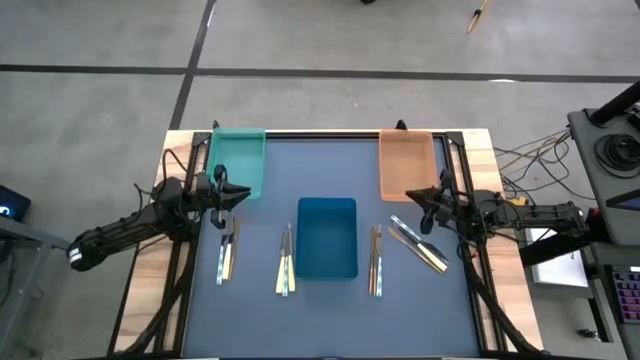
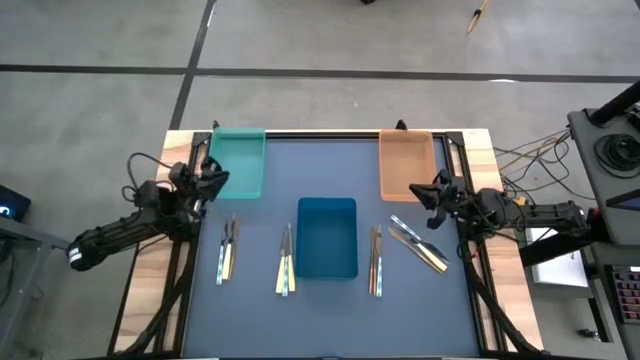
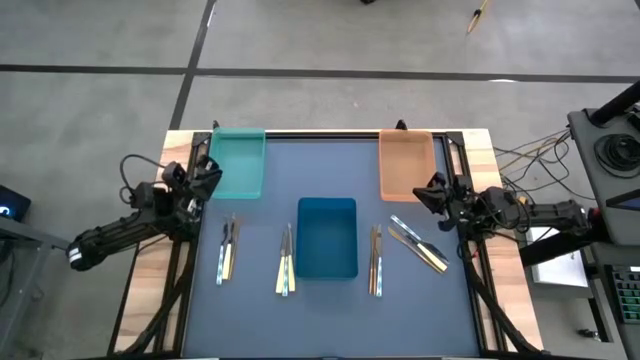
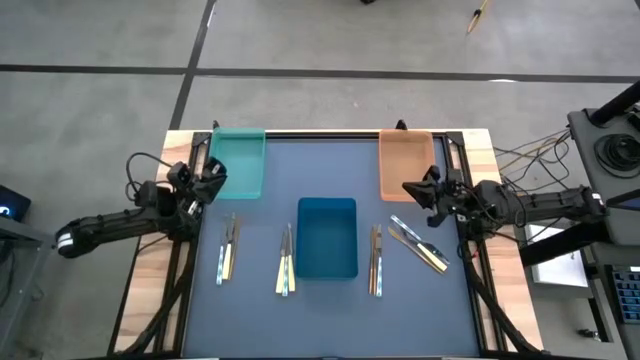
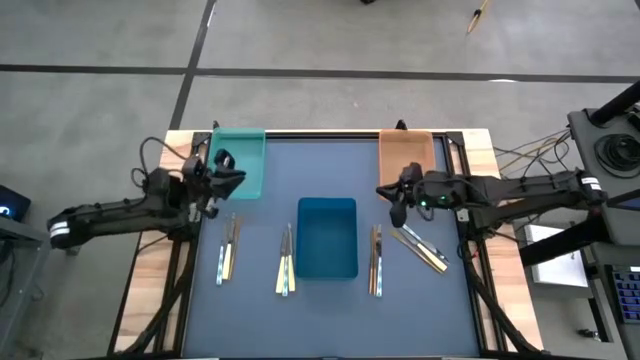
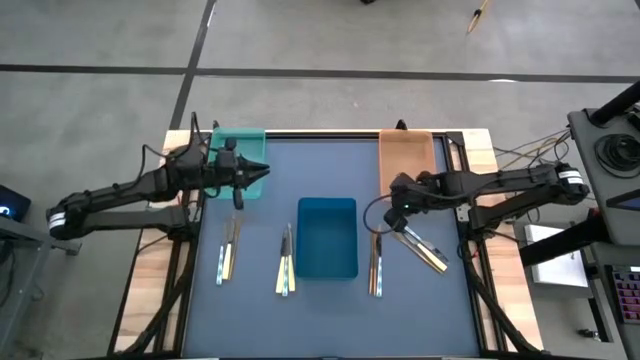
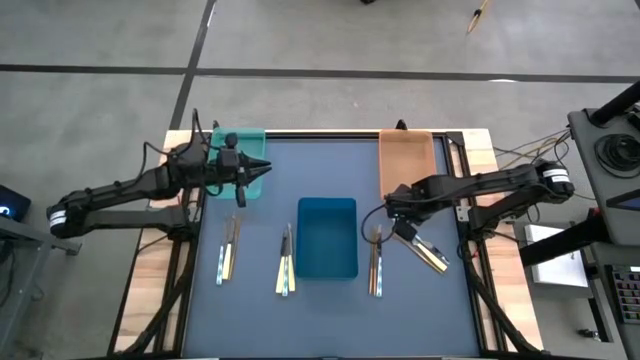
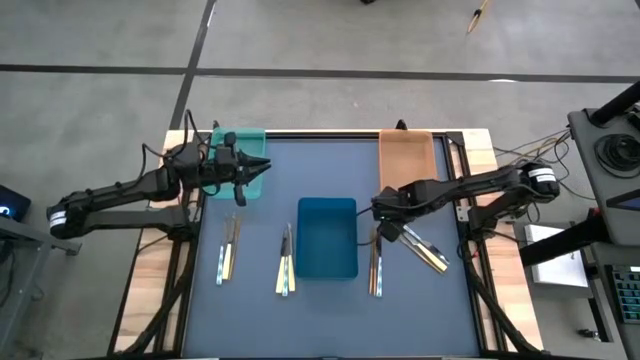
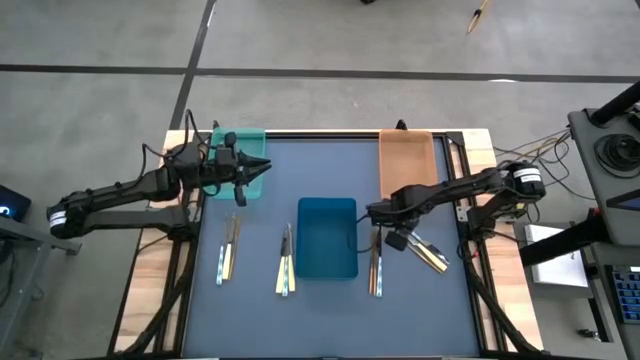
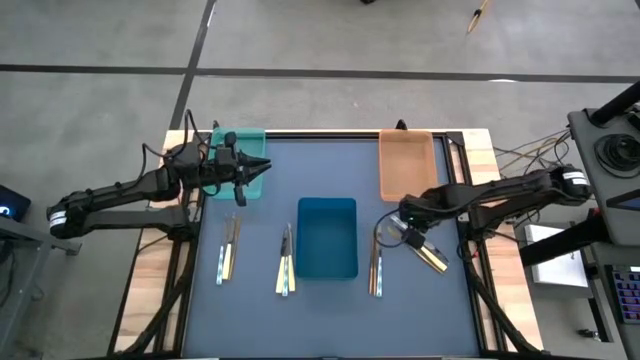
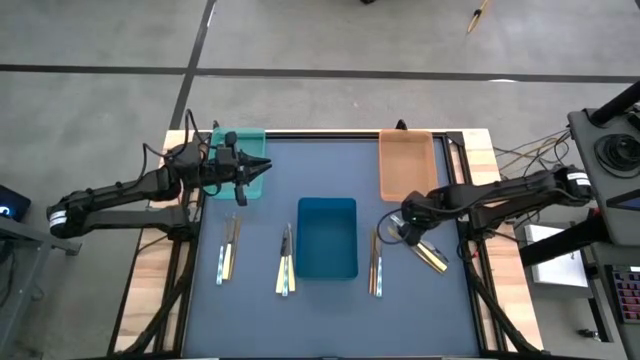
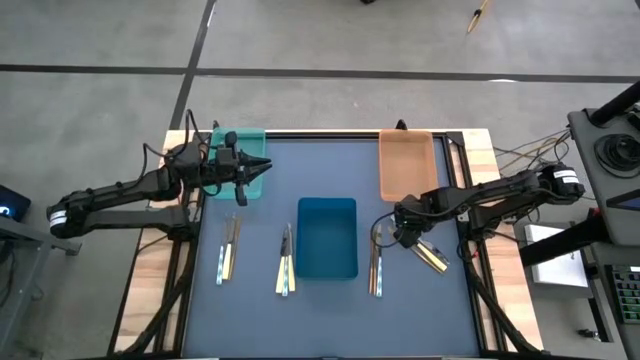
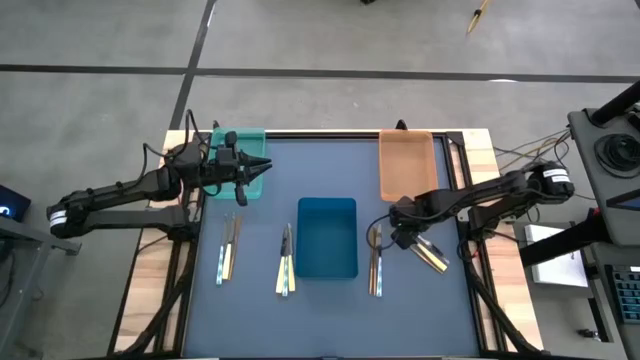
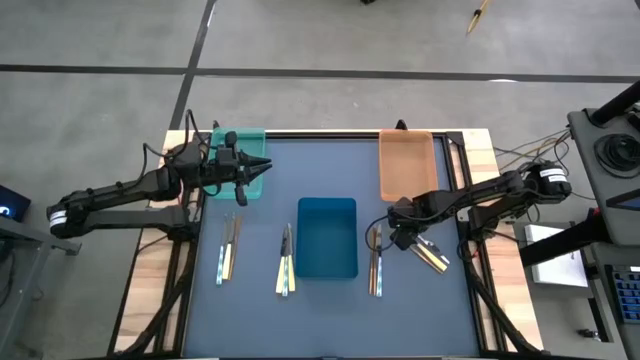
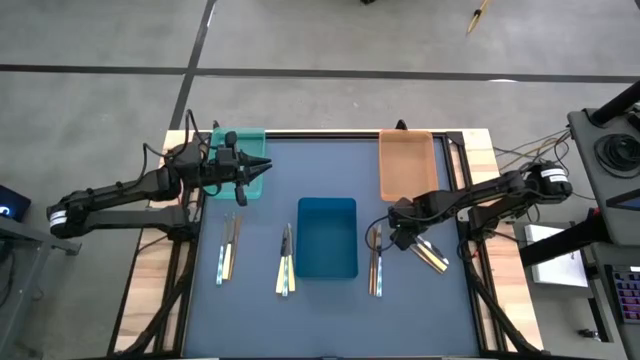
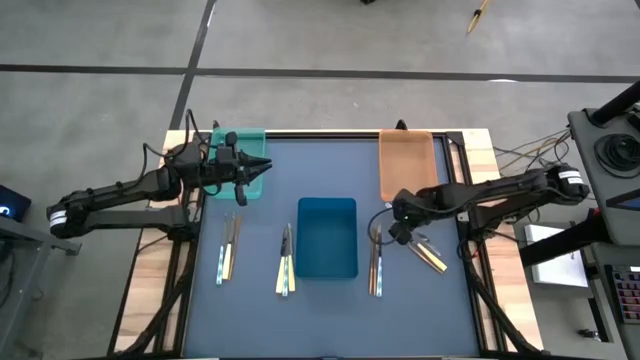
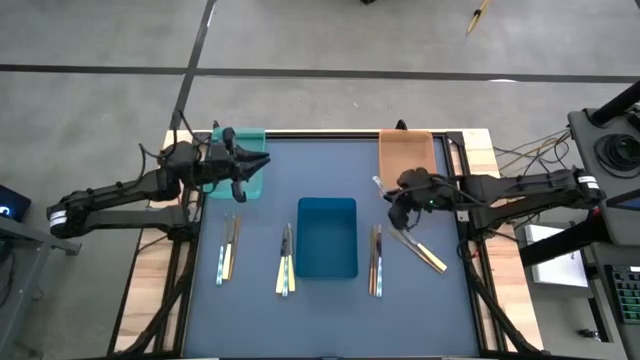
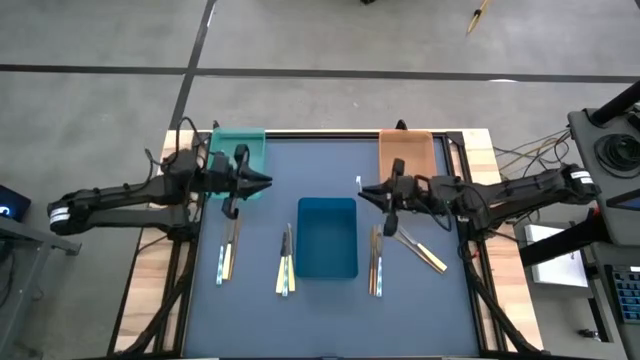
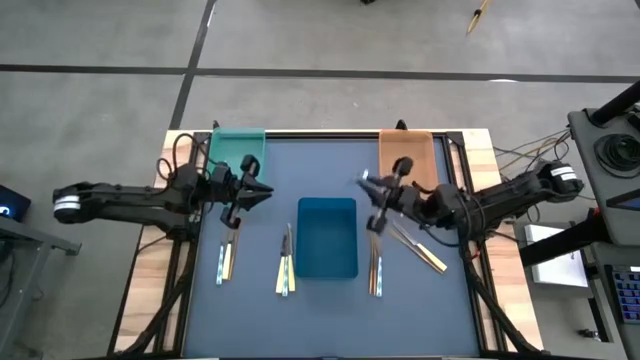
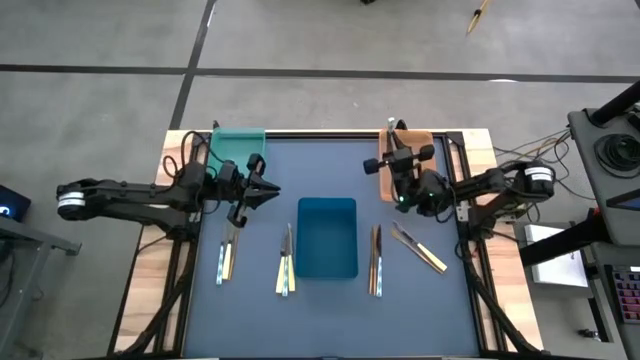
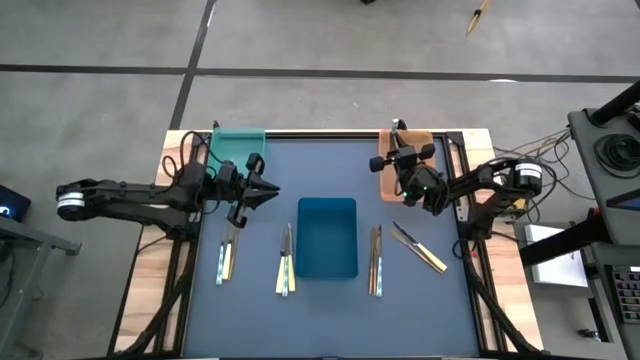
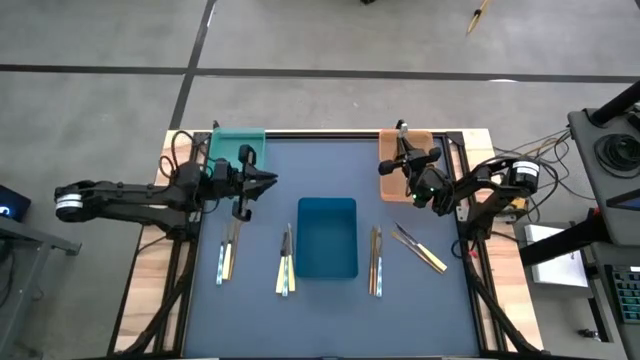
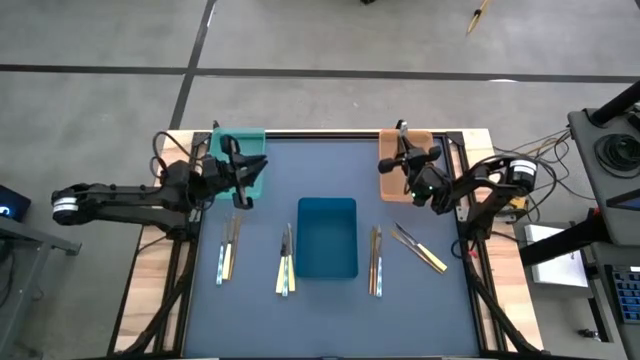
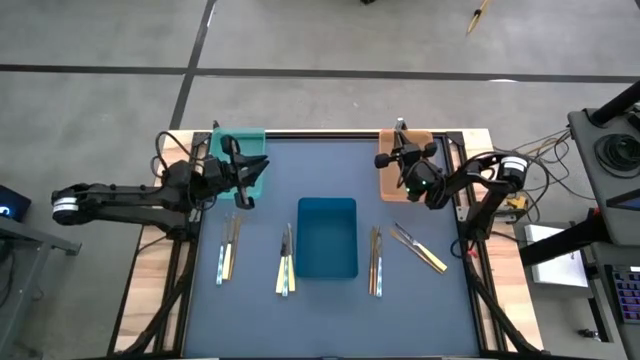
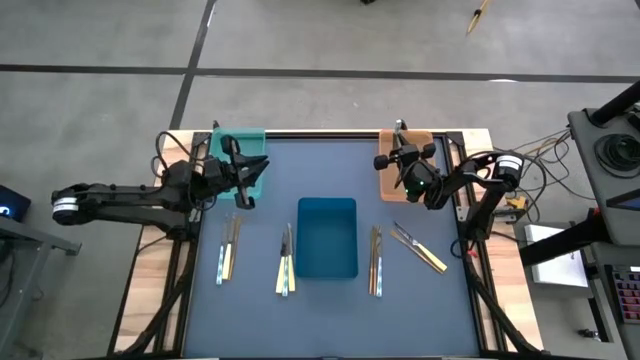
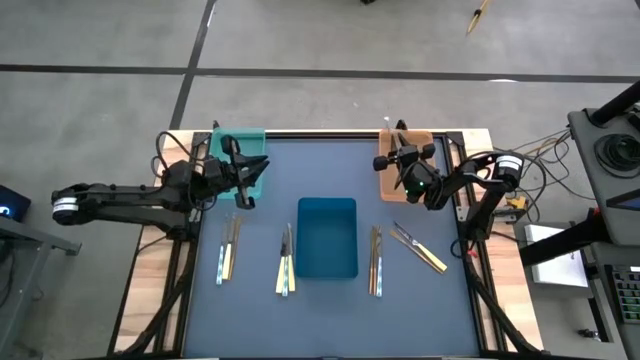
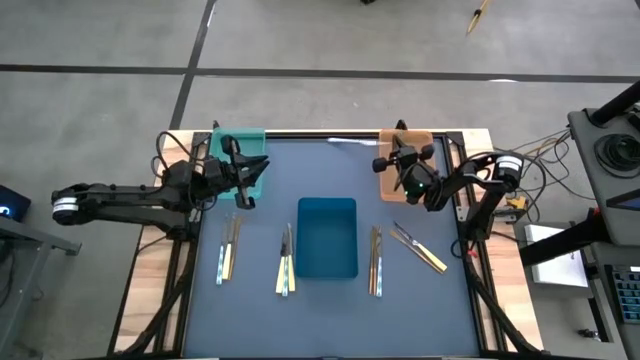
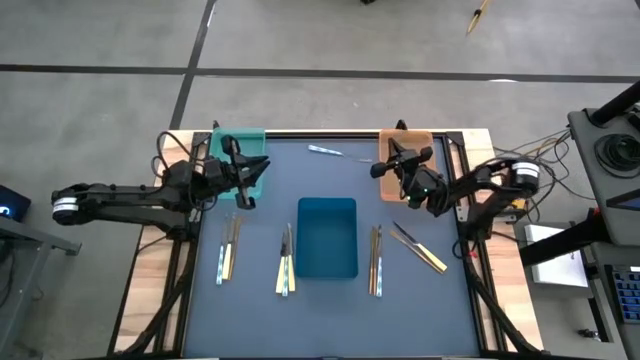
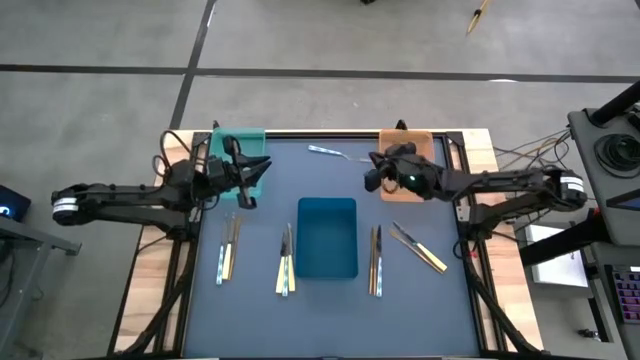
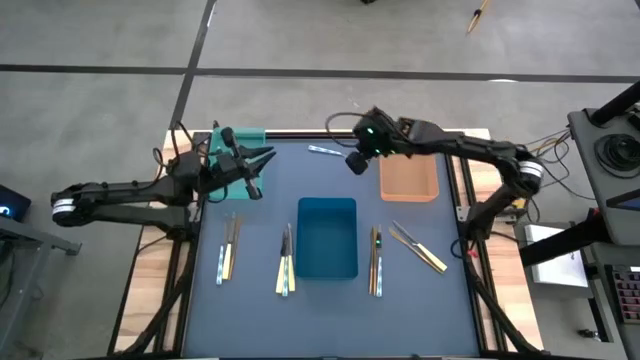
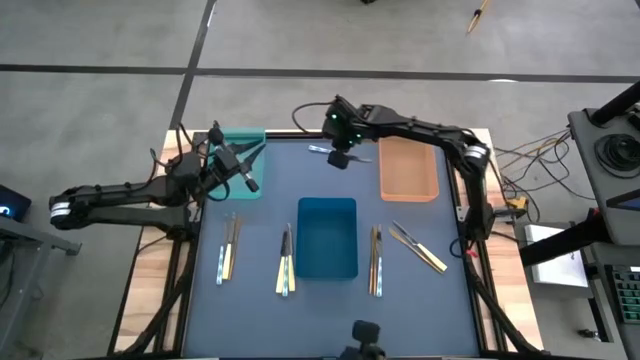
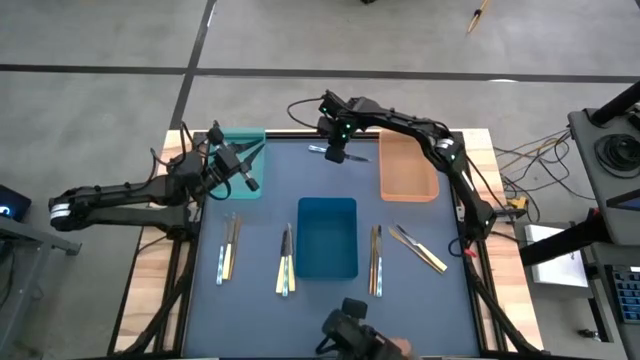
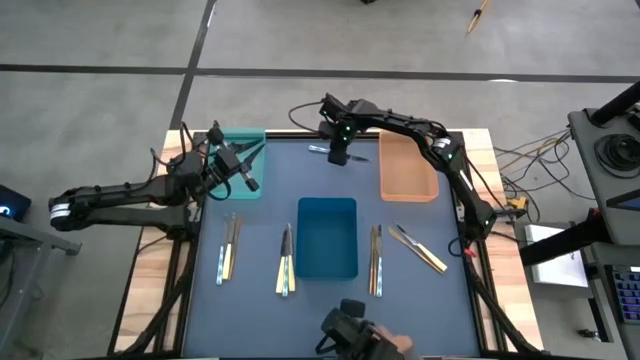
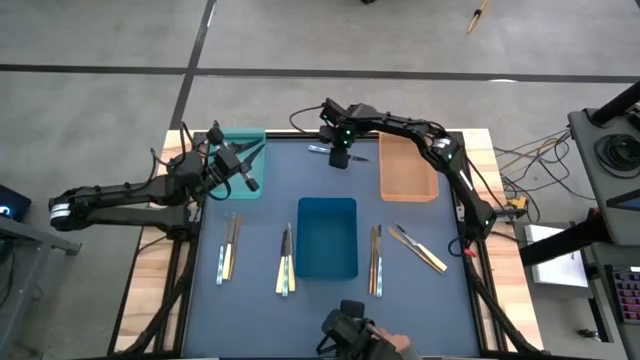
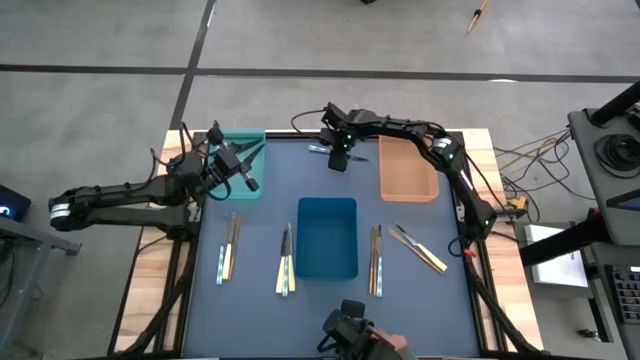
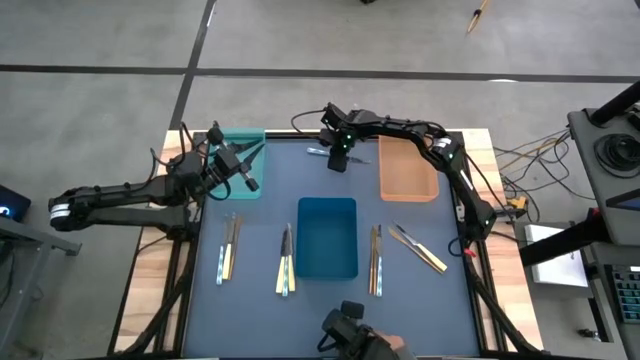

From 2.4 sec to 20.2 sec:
Task: Sort silverware by color (type)
Put the top right blue and white knife into the orange bin

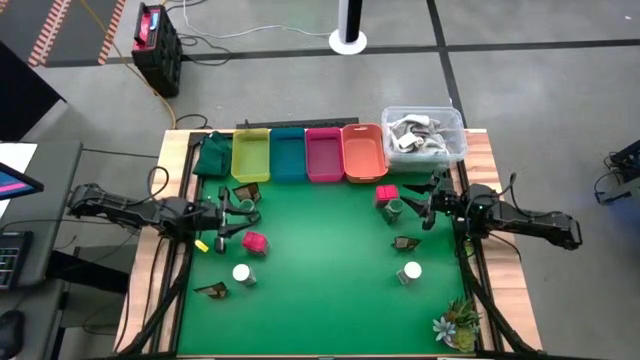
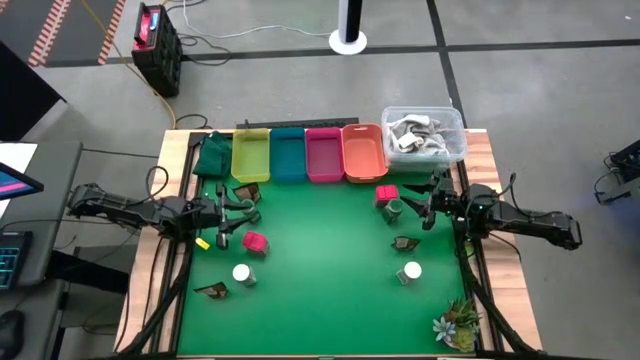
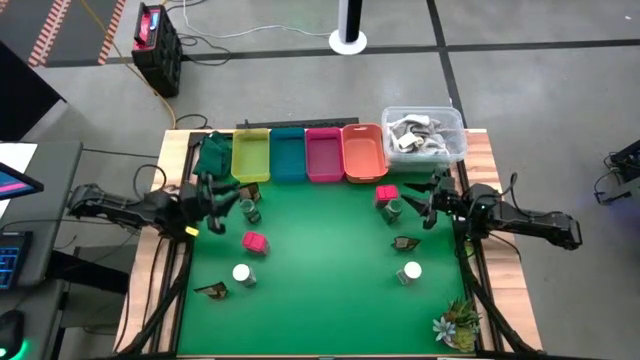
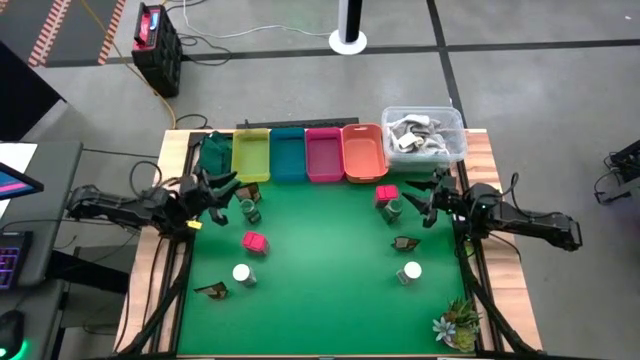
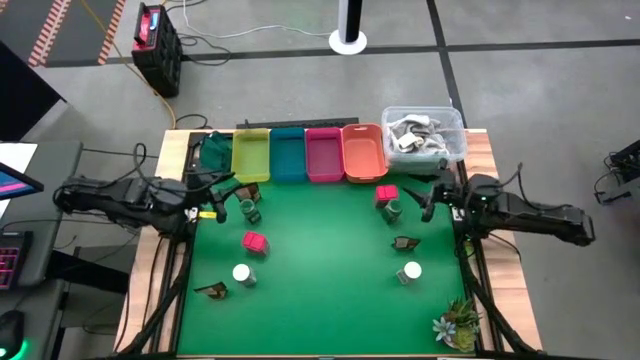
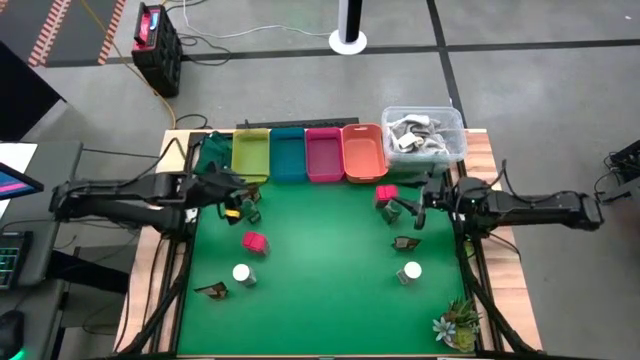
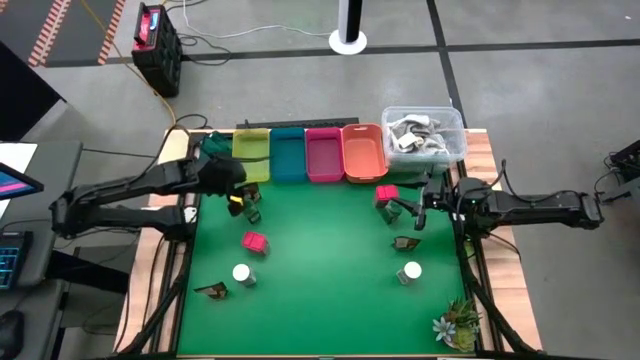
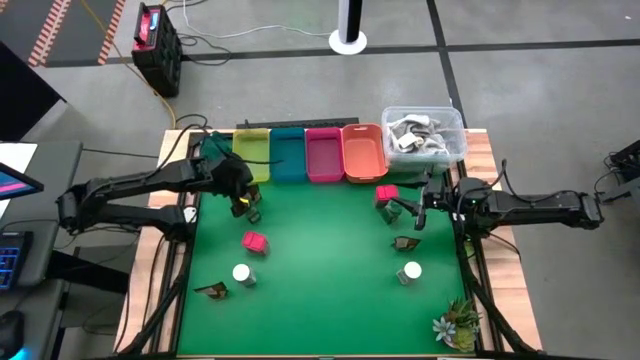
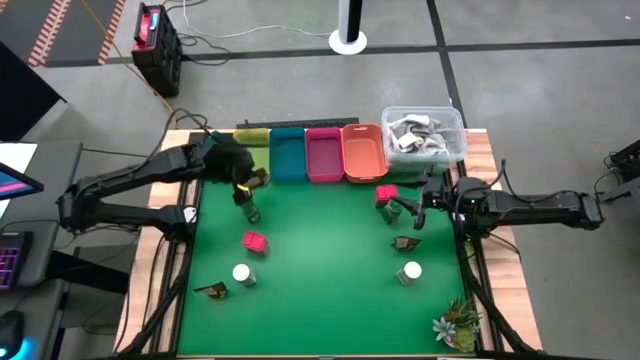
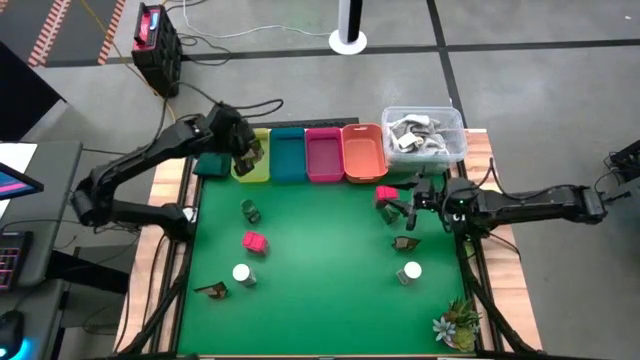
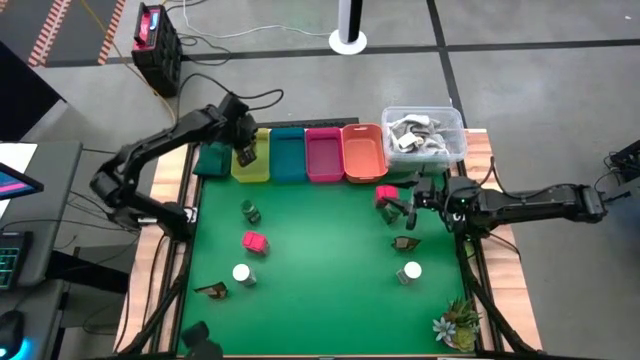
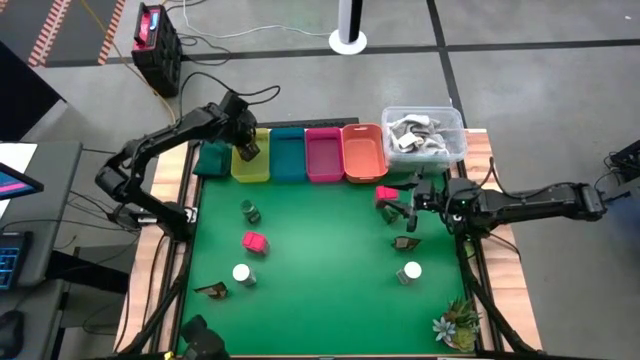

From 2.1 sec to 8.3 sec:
Task: Sort spices by type
Put the top left orange spice pack into the yellow bin
